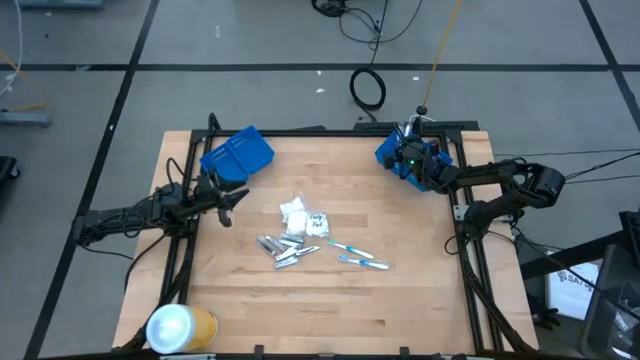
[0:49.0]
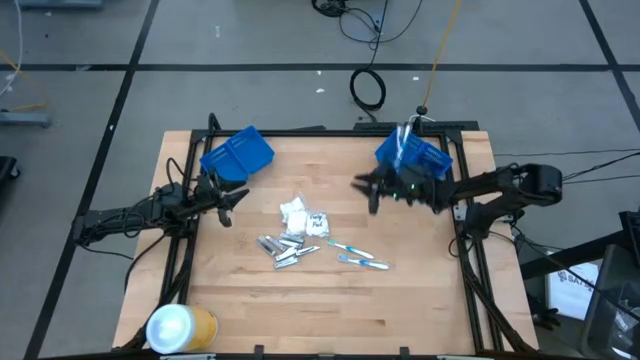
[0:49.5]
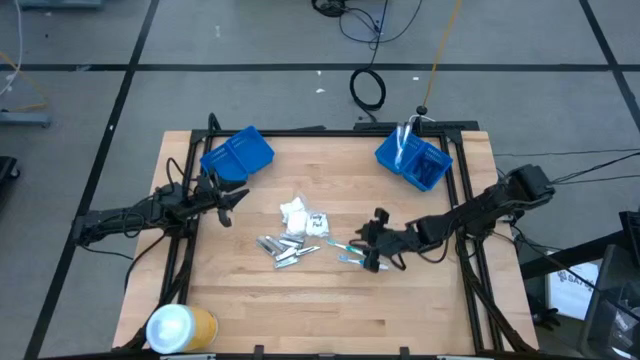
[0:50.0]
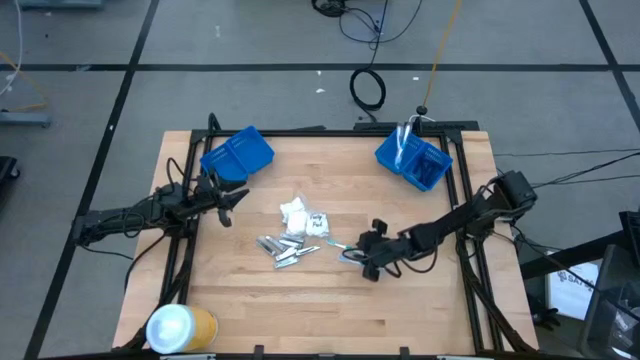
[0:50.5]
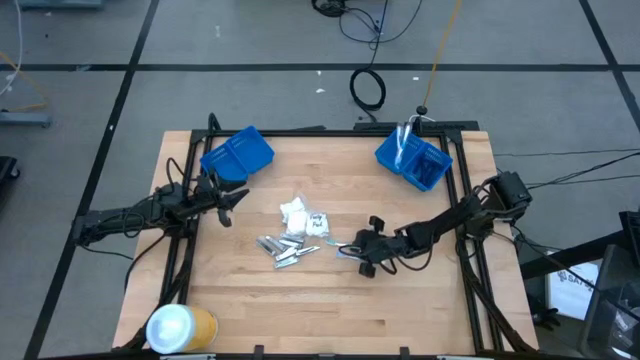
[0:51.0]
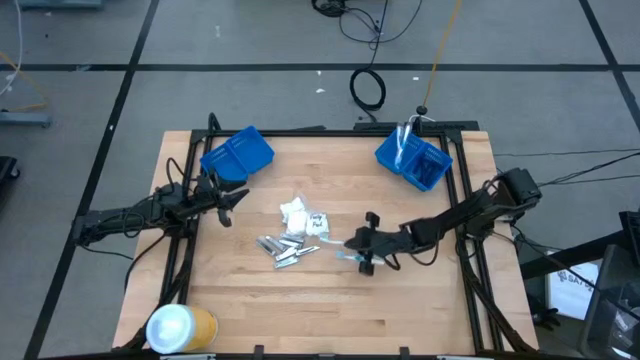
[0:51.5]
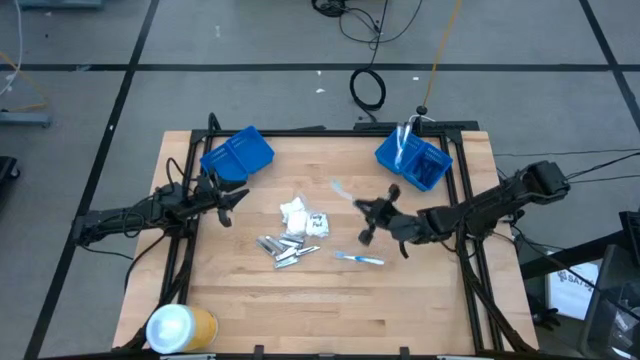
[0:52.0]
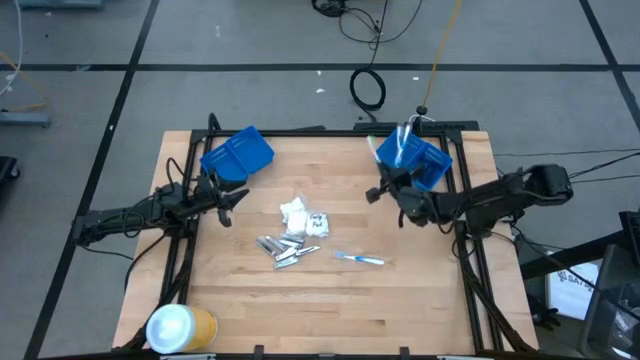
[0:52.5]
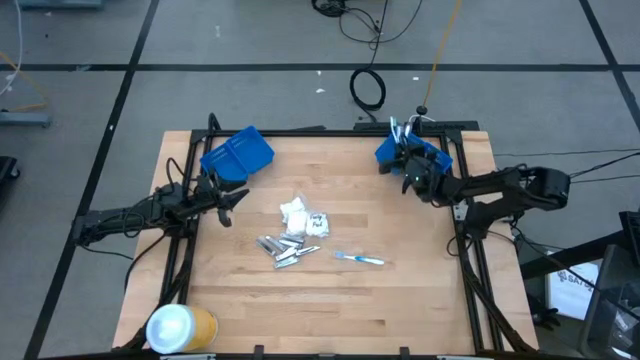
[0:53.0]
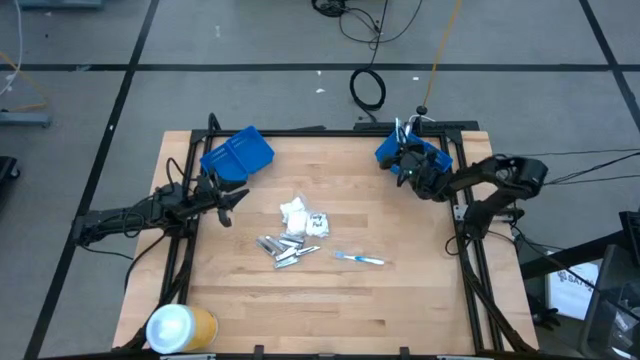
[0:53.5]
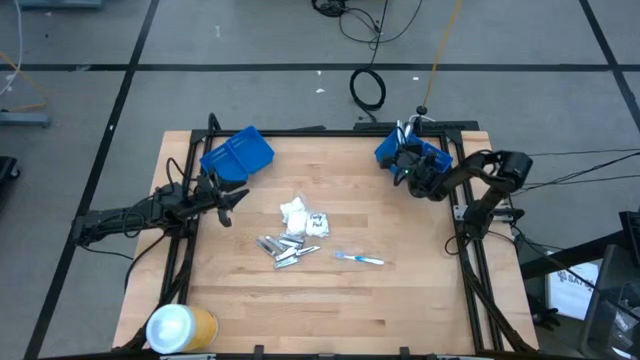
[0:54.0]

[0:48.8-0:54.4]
Task: Pick & Place Travel size toiletries
Put the green toothbrush into the middle right blue basket

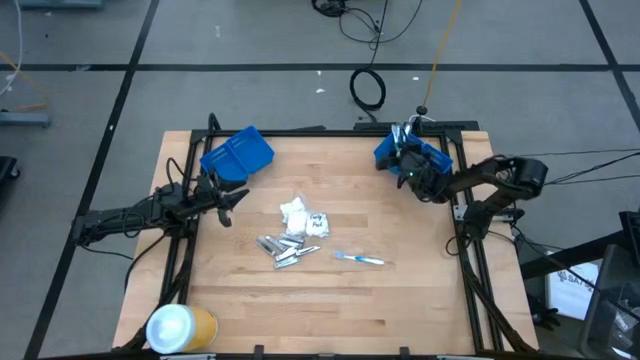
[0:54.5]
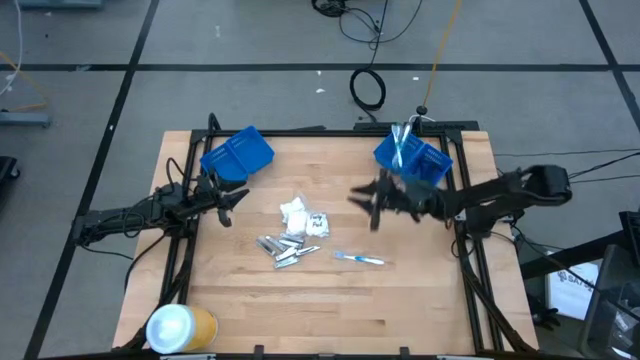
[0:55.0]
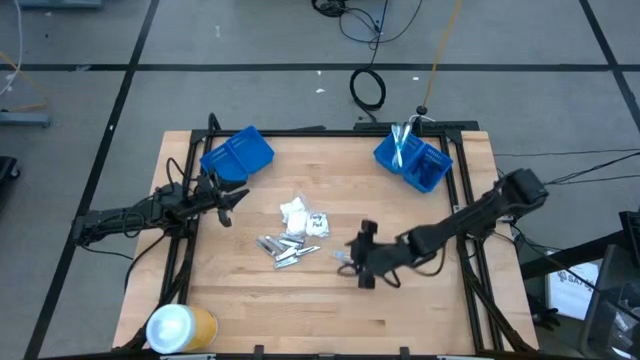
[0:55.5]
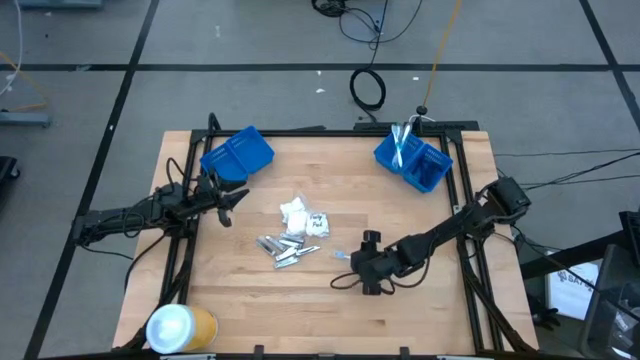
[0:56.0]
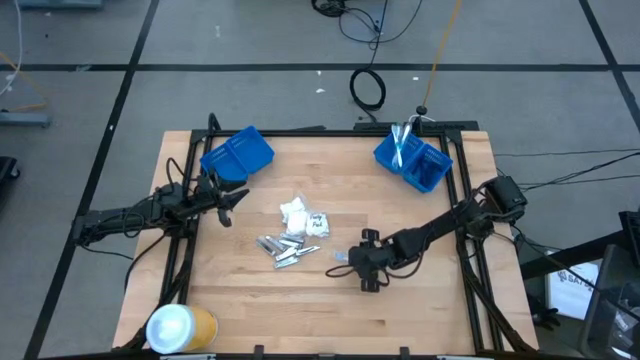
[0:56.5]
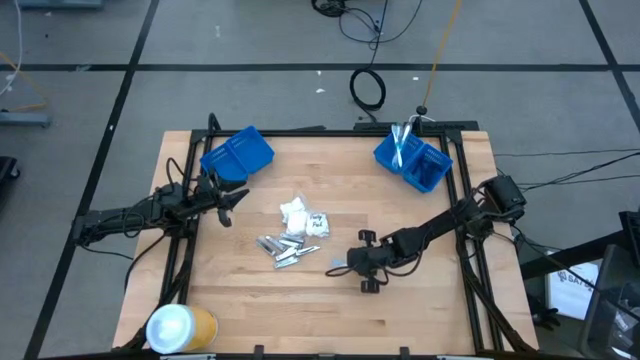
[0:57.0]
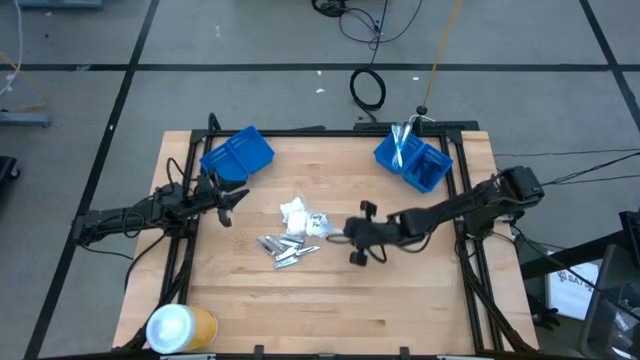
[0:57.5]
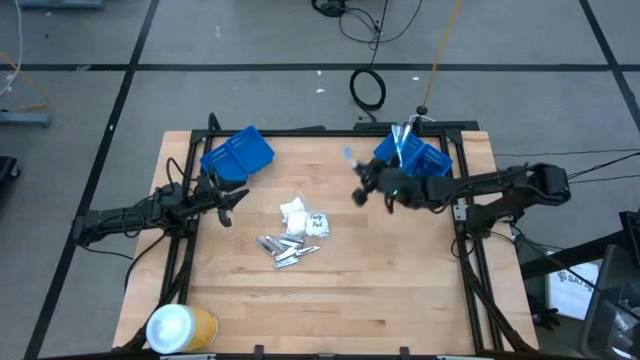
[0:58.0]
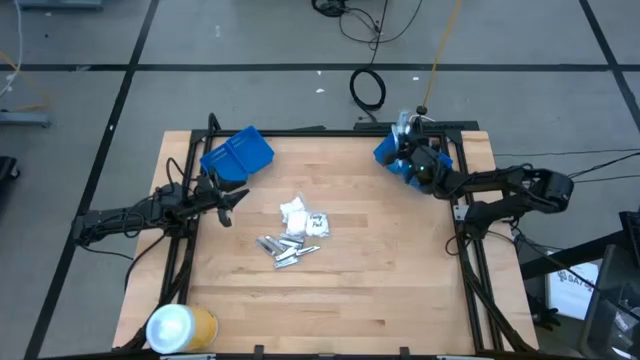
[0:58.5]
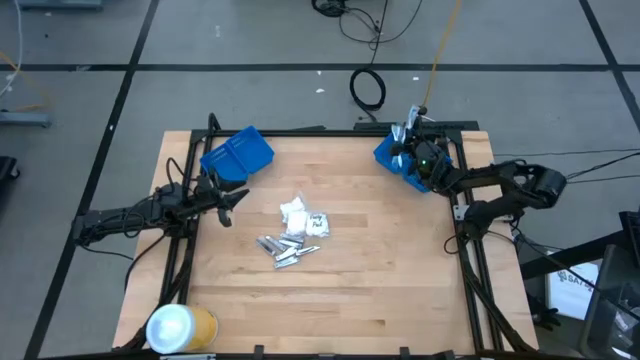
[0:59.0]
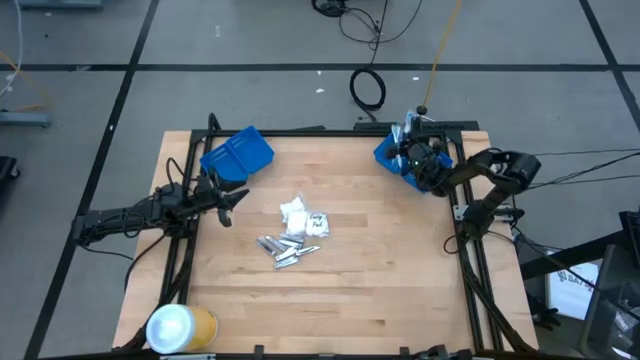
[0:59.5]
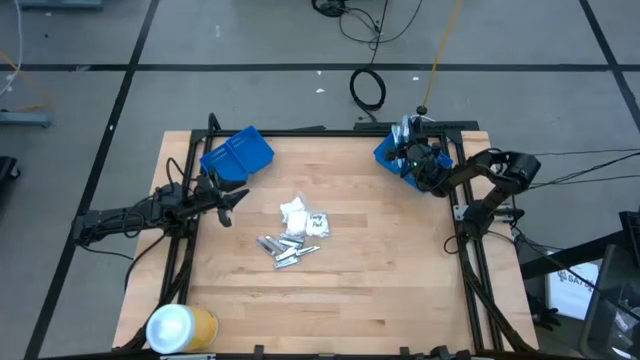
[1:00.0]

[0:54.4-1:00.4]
Put the blue toothbrush into the middle right blue basket

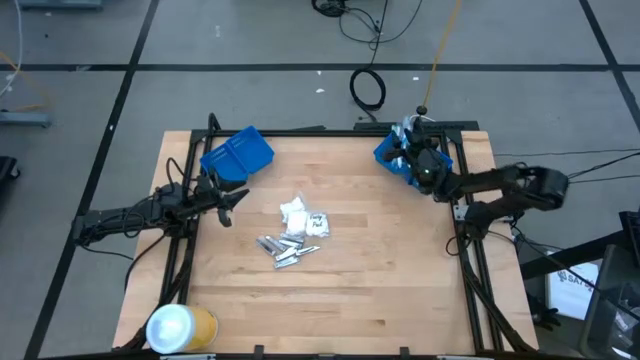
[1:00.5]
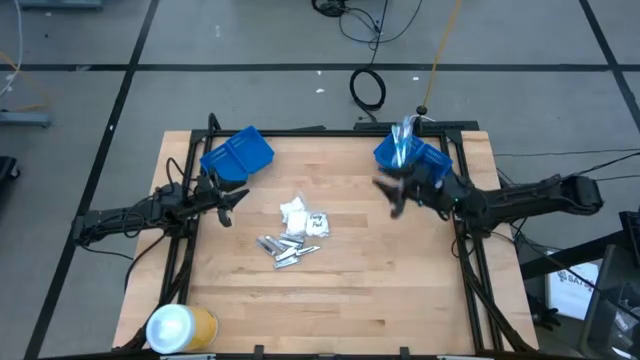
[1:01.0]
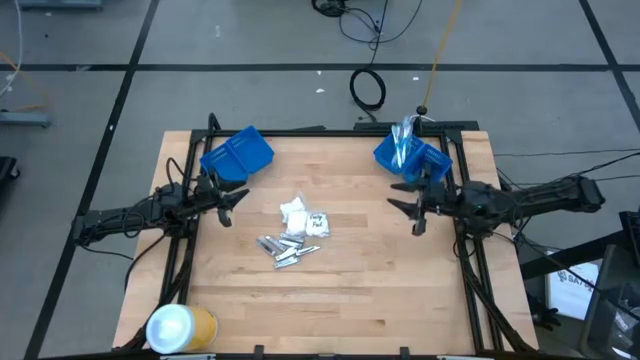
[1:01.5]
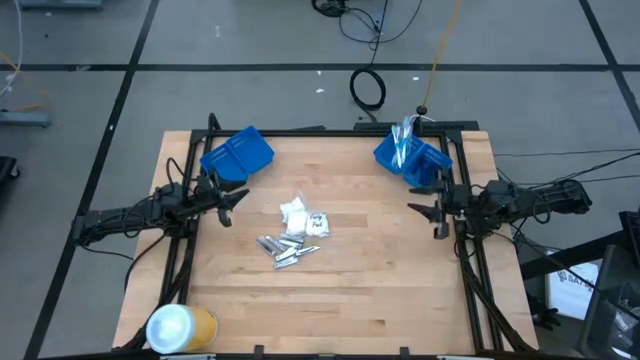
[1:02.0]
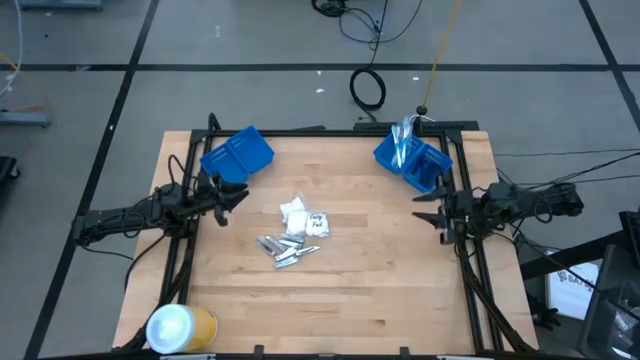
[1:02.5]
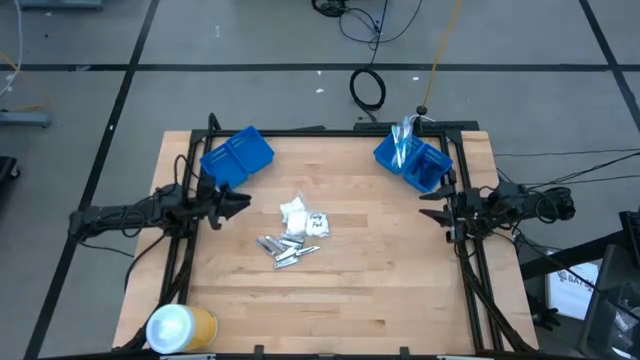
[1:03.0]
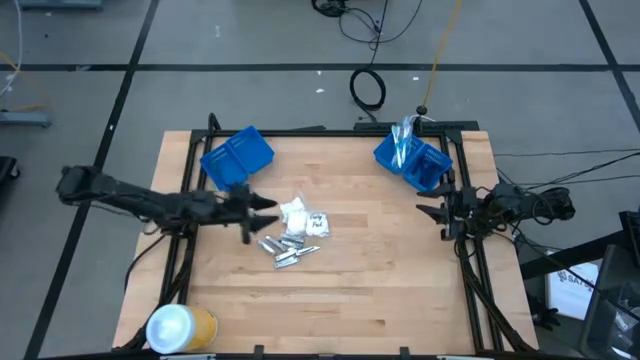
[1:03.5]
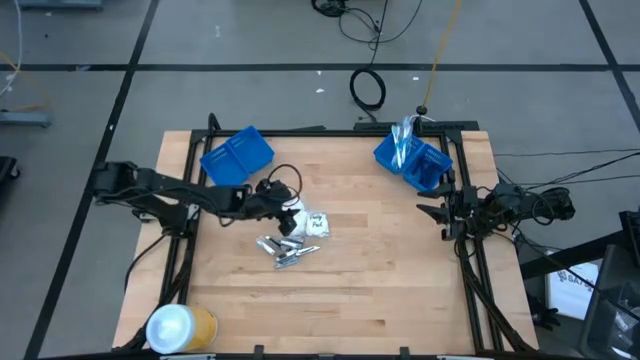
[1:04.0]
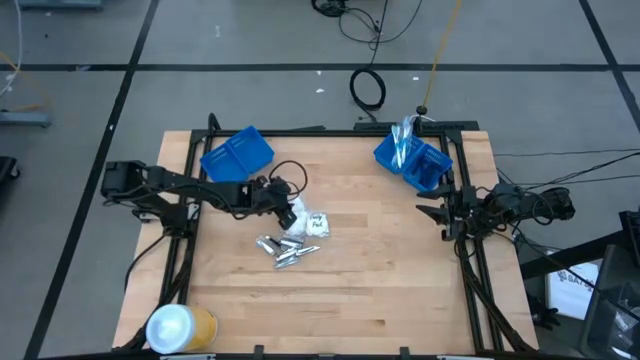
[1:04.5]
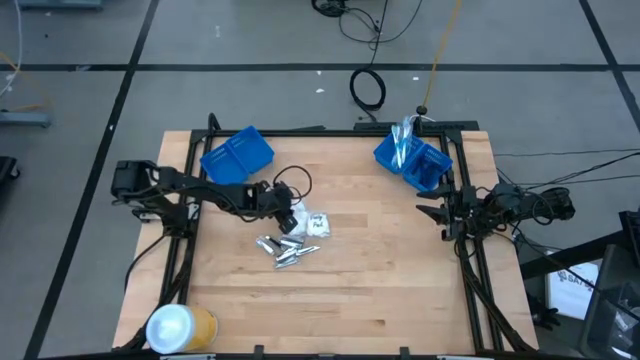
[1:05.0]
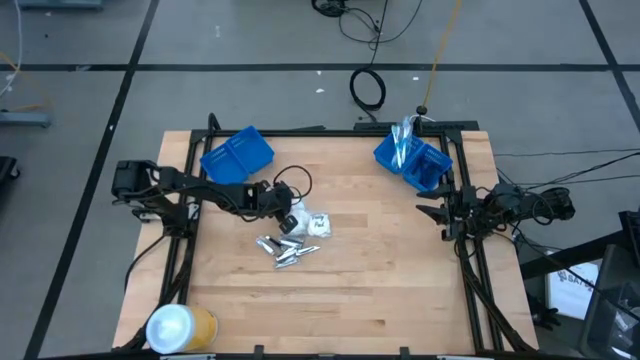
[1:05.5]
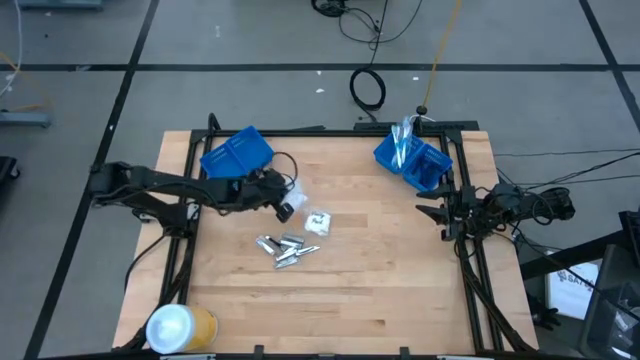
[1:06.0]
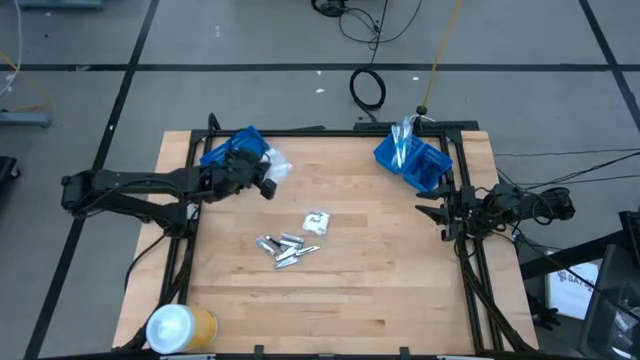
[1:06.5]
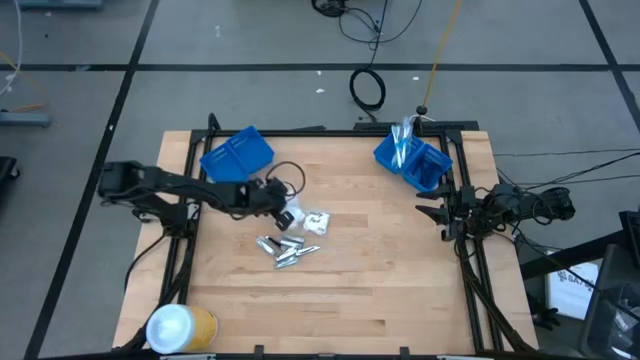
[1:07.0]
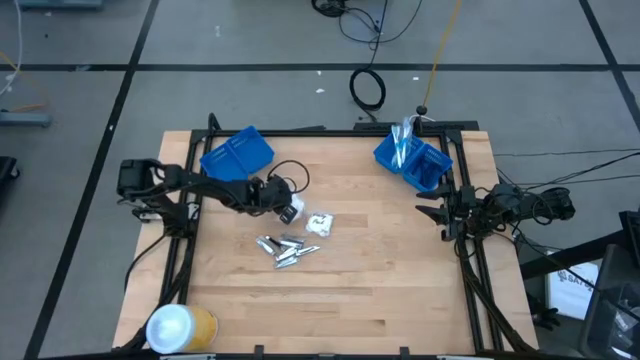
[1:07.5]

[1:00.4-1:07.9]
Put the transparent cotton pack into the middle left blue basket

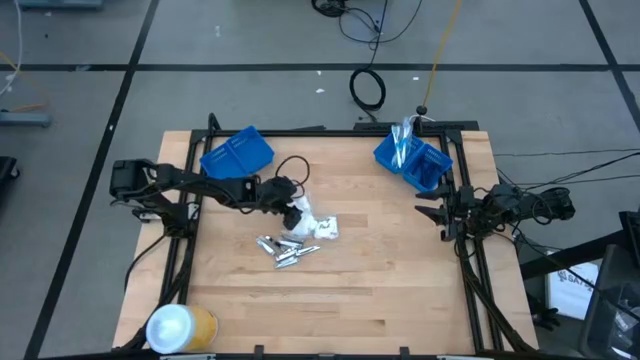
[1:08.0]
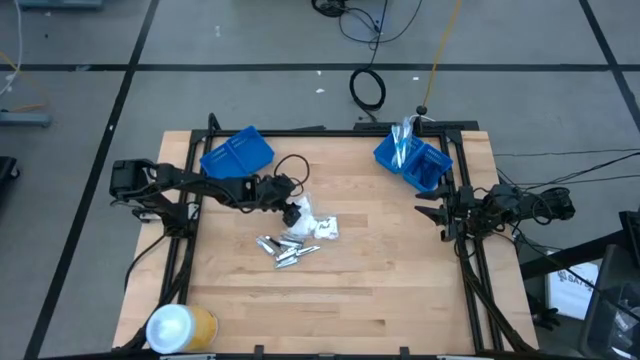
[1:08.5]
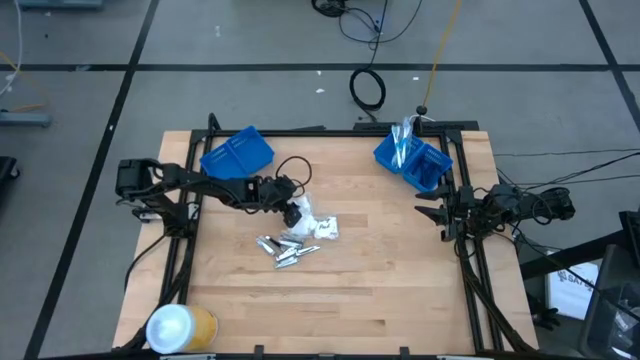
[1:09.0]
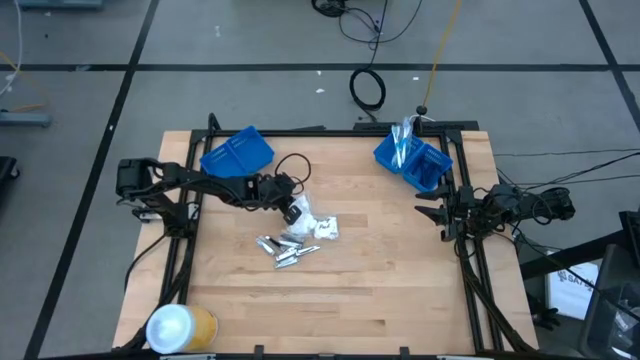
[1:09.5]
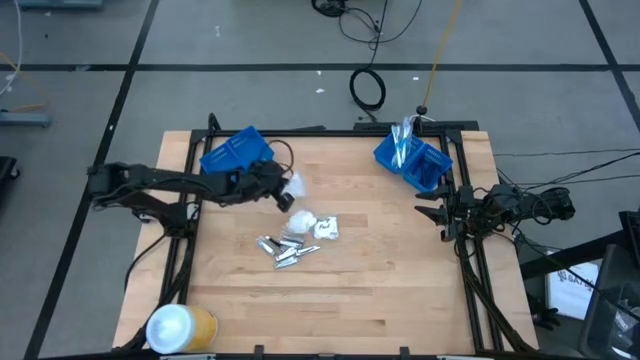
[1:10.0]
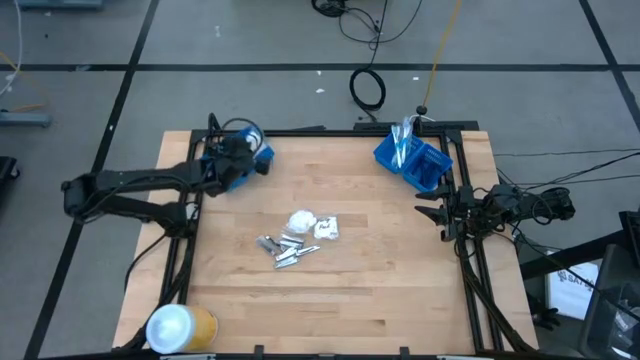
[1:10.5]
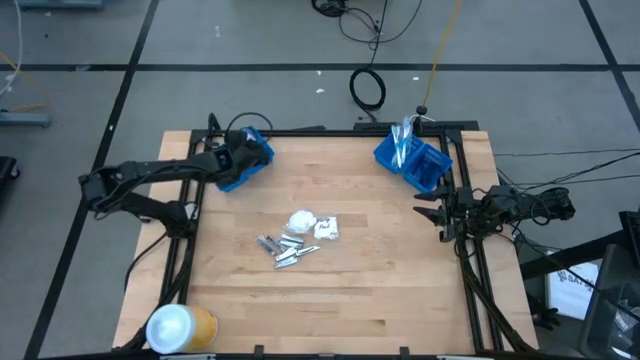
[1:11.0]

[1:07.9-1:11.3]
Put the transparent cotton pack into the middle left blue basket
